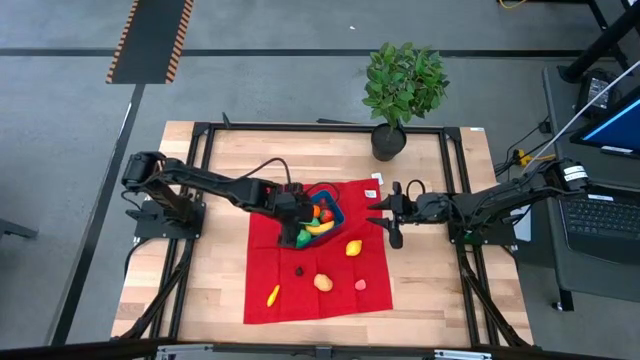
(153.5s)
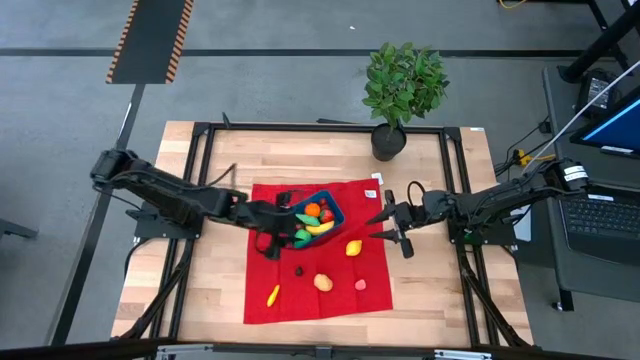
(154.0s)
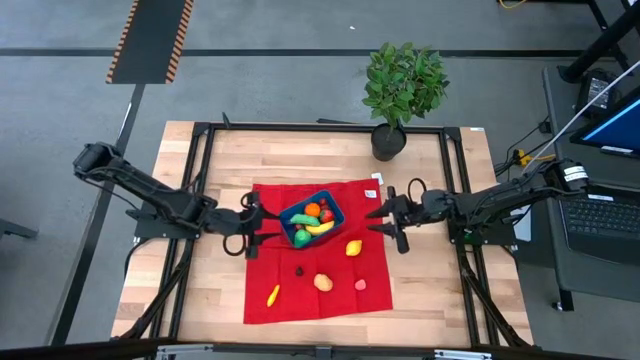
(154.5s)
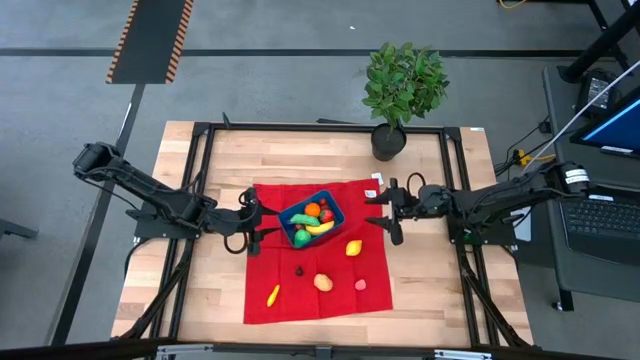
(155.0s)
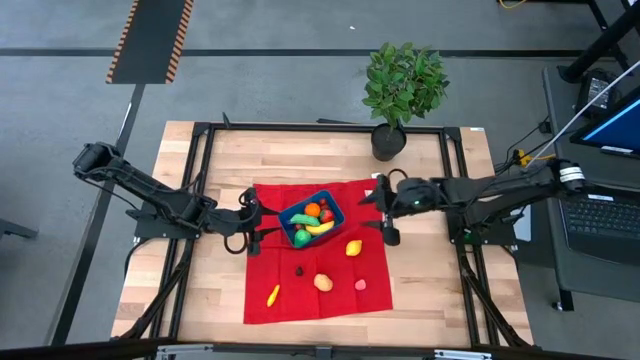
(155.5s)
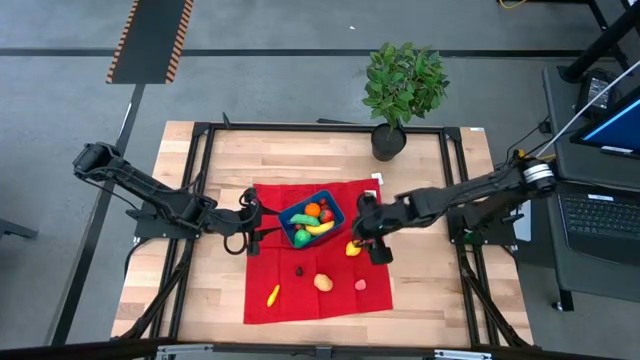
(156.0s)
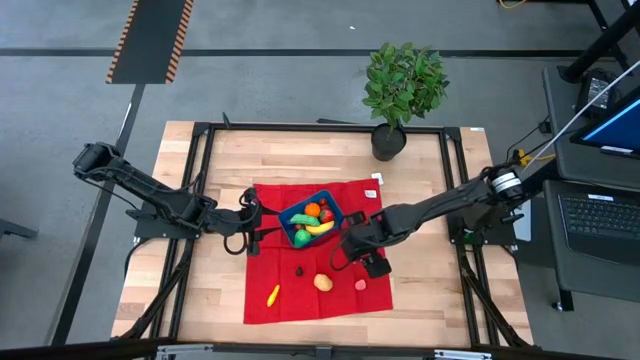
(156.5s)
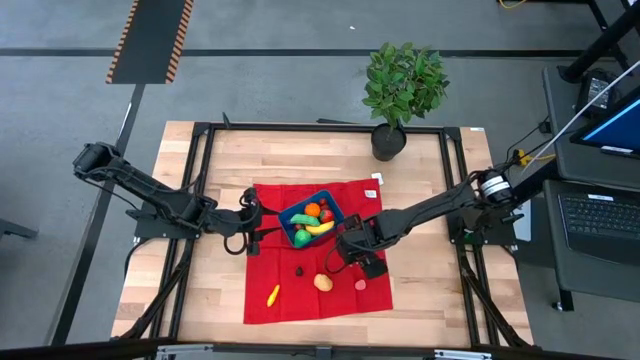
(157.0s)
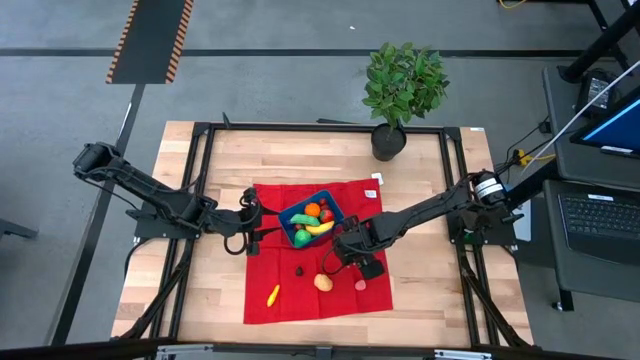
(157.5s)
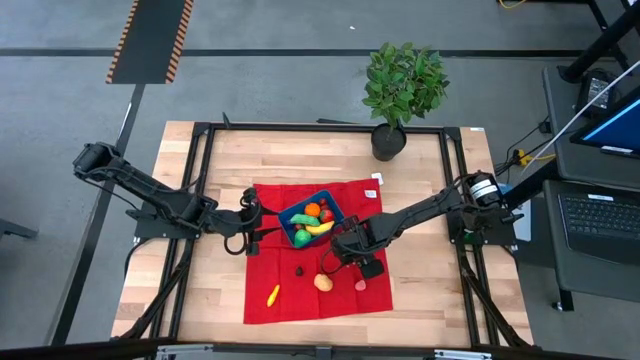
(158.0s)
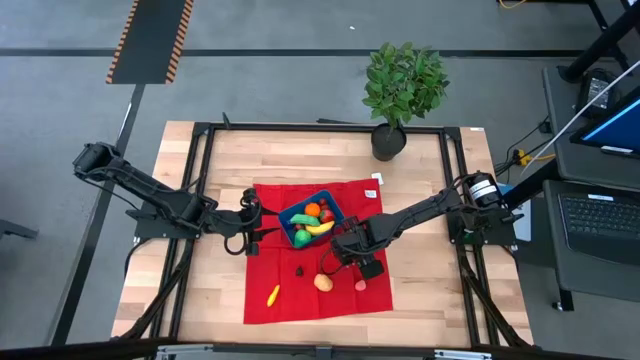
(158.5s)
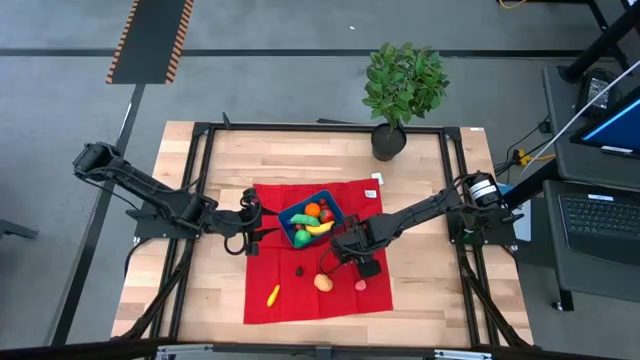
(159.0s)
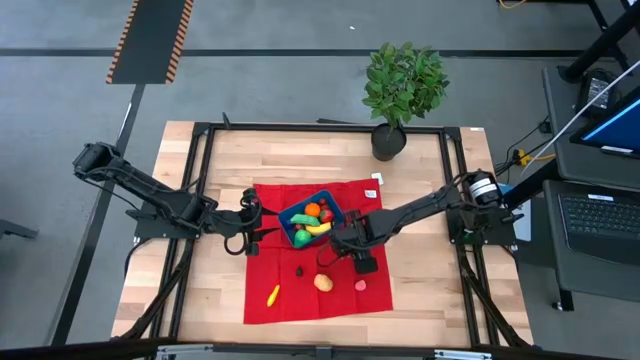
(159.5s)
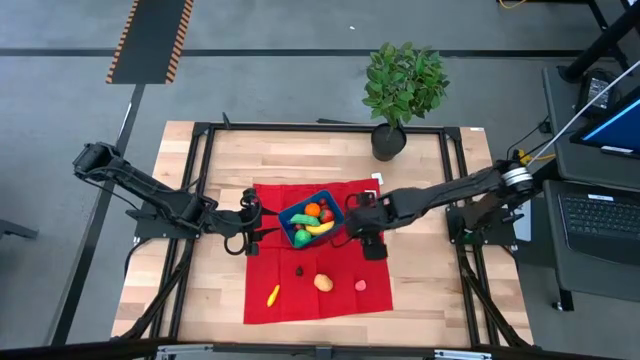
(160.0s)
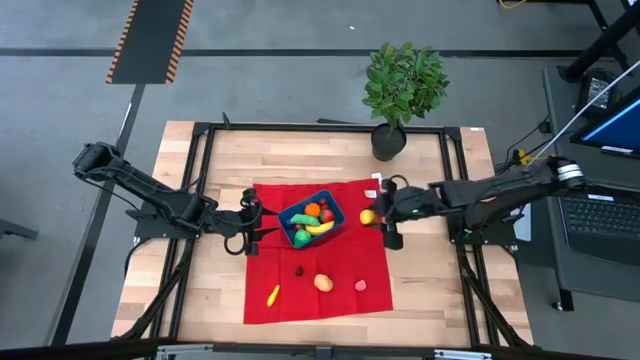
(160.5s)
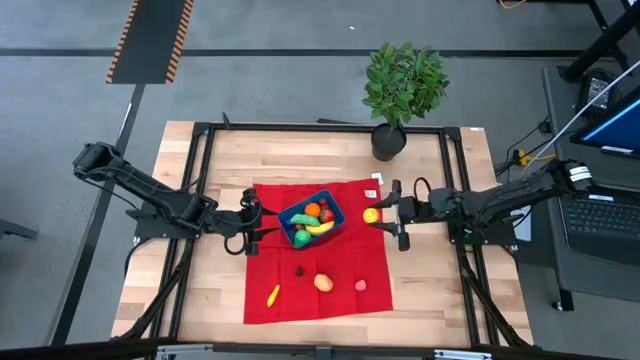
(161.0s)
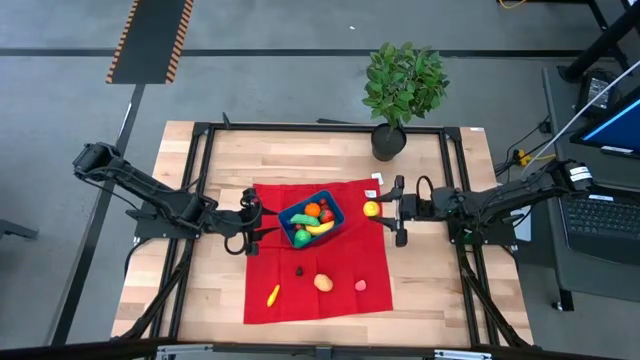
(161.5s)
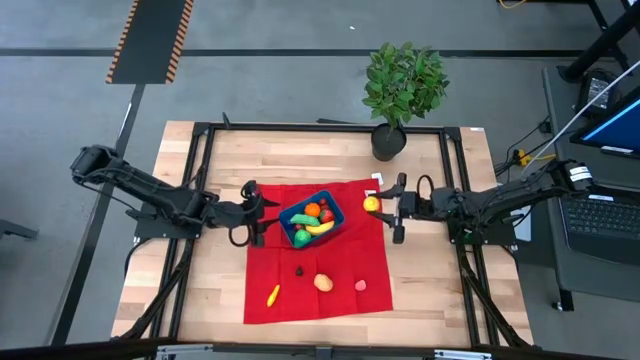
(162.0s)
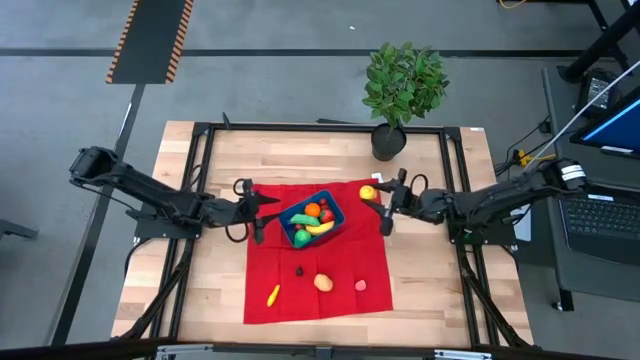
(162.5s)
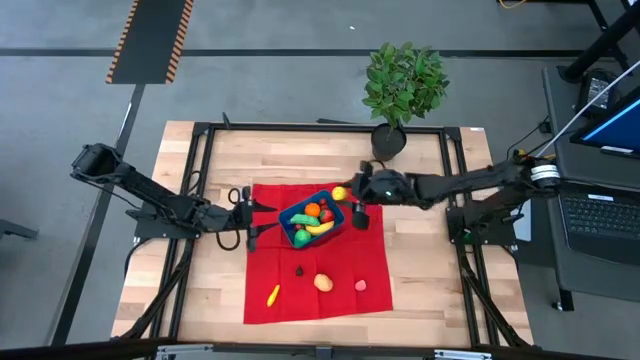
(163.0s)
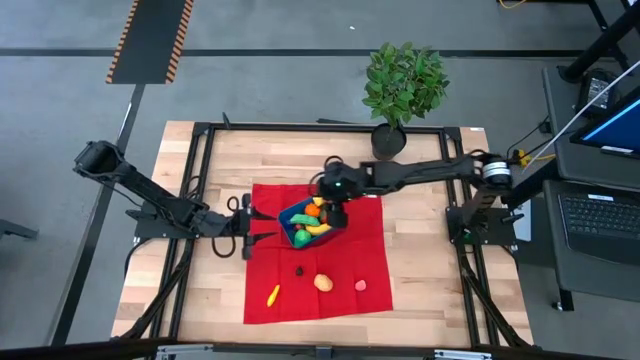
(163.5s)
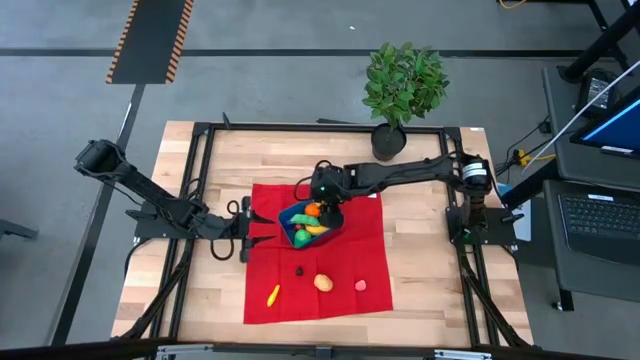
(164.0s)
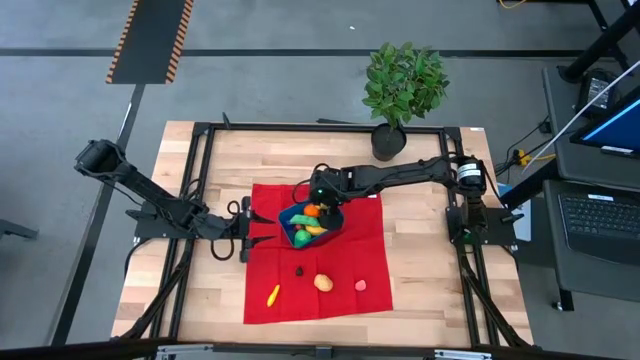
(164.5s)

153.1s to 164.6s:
Task: Pick and placing Produce into tupperware
Put the lemon into the blue bin

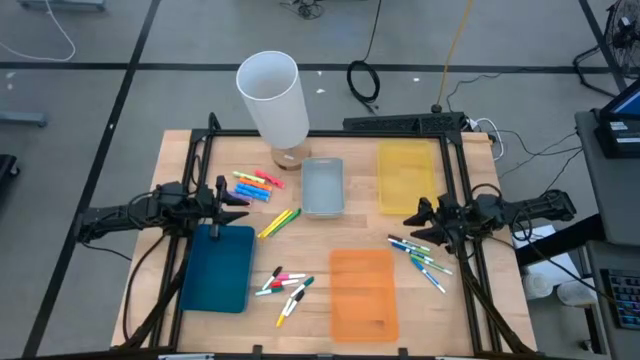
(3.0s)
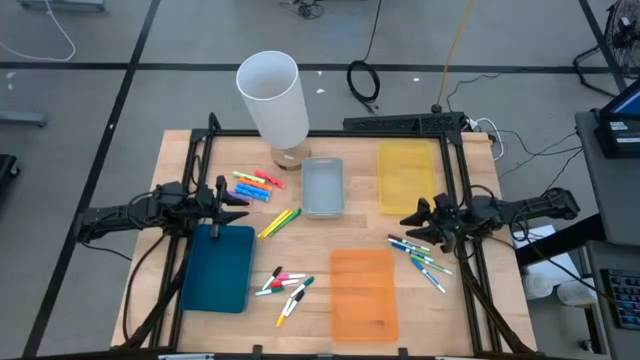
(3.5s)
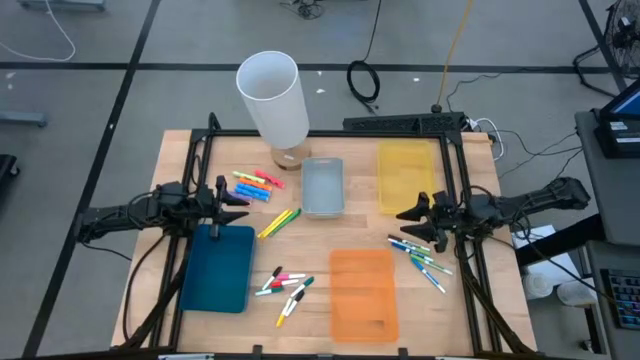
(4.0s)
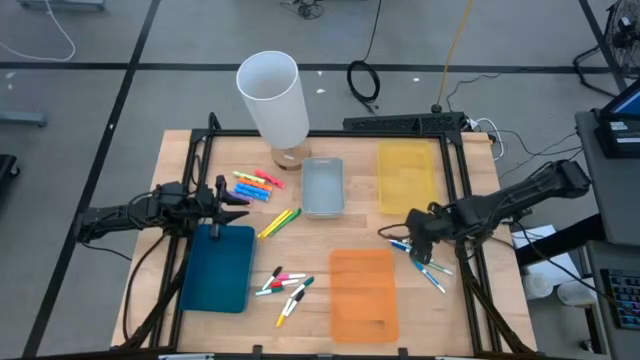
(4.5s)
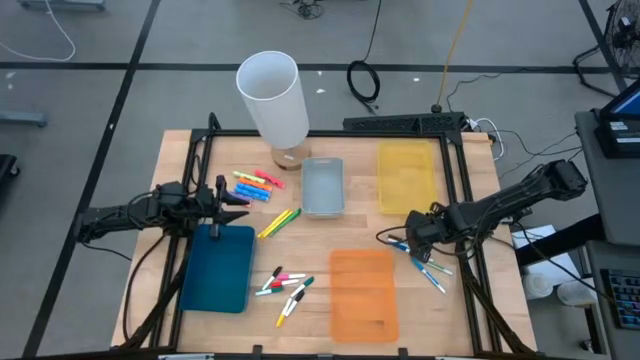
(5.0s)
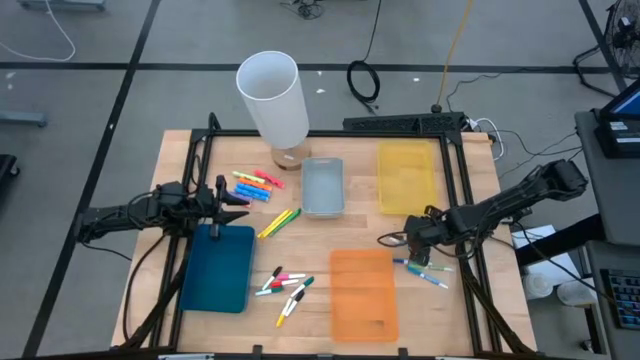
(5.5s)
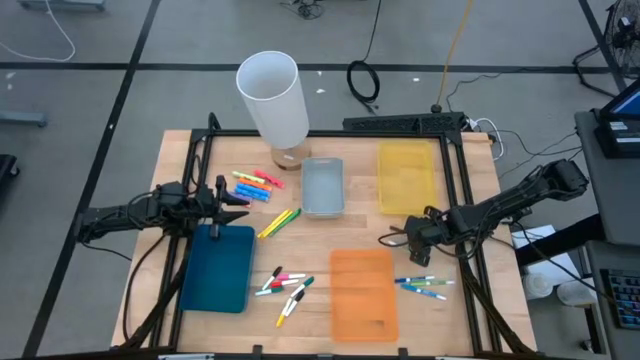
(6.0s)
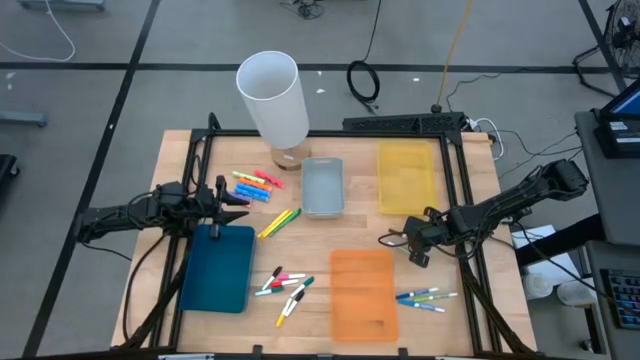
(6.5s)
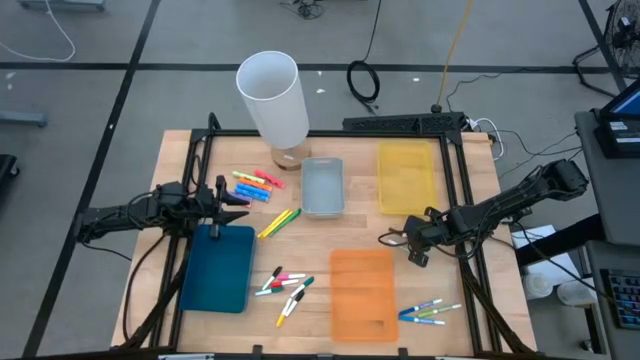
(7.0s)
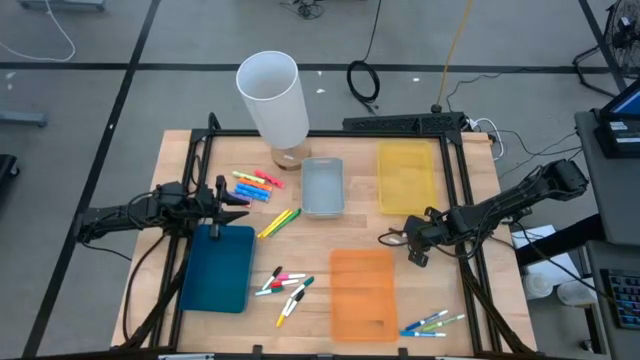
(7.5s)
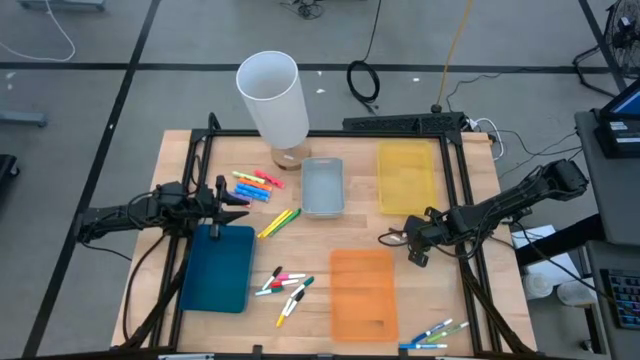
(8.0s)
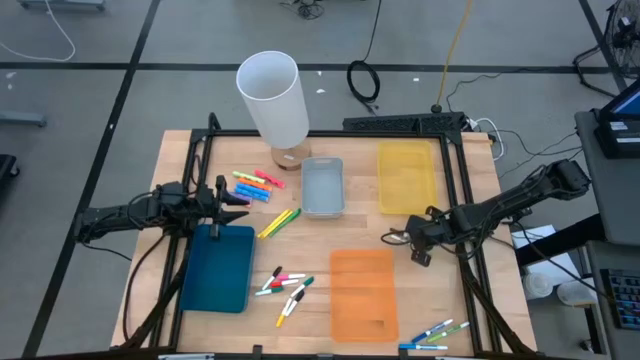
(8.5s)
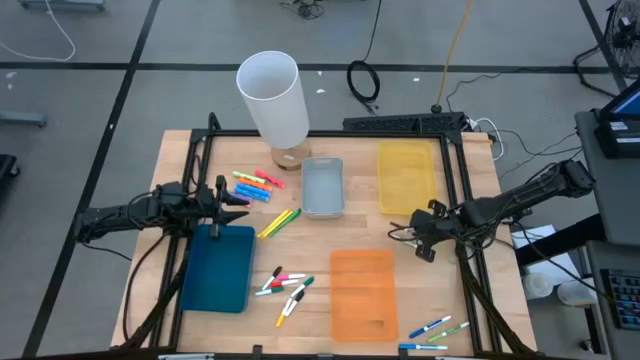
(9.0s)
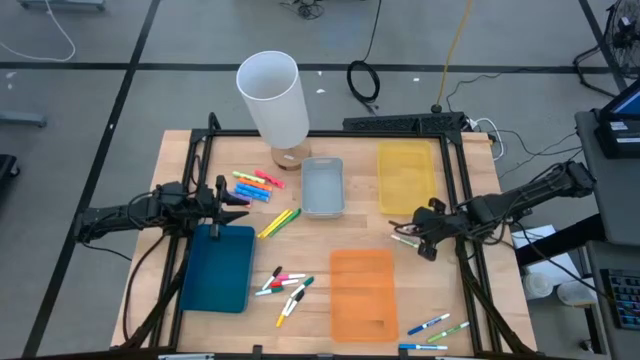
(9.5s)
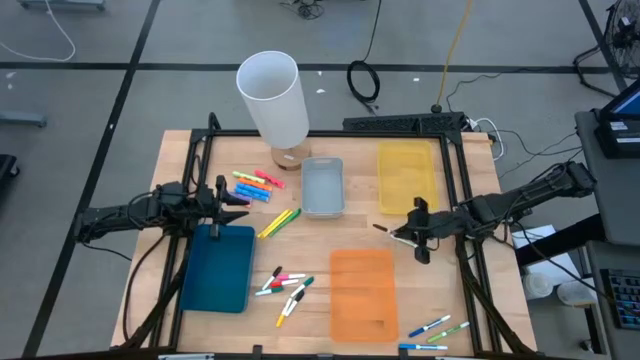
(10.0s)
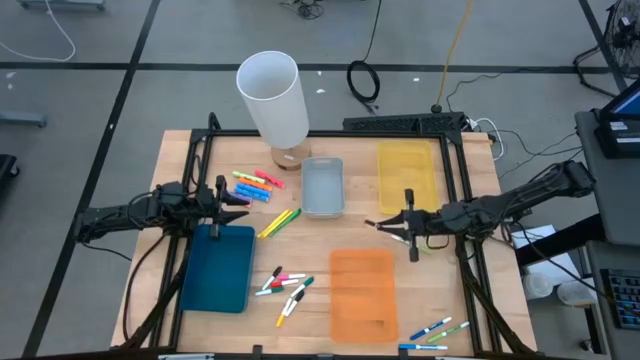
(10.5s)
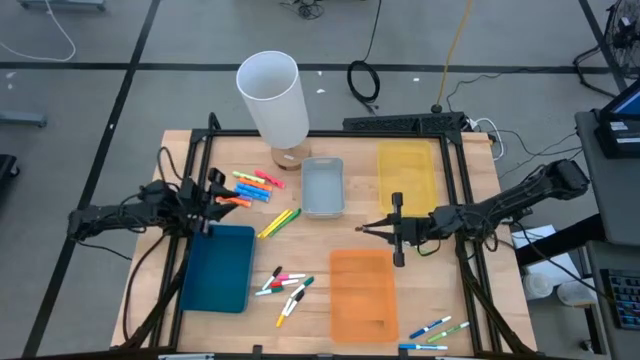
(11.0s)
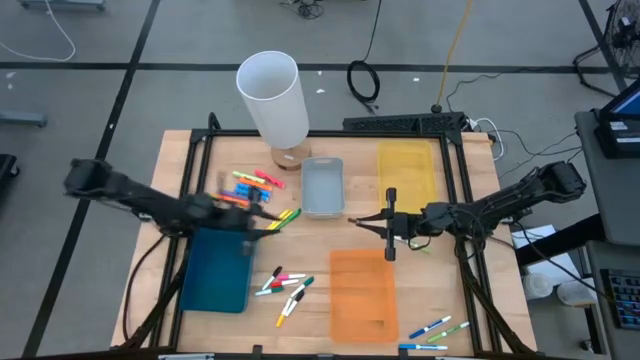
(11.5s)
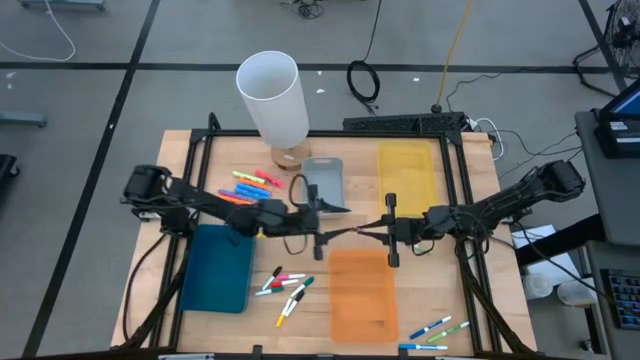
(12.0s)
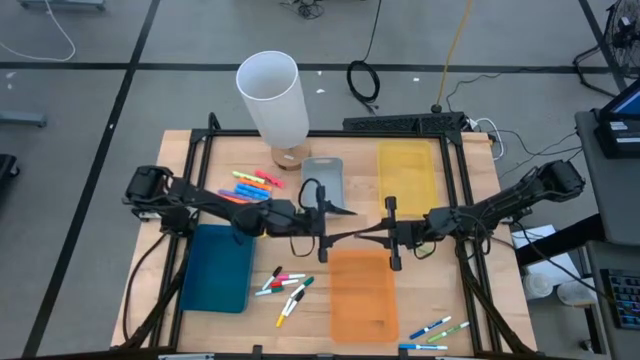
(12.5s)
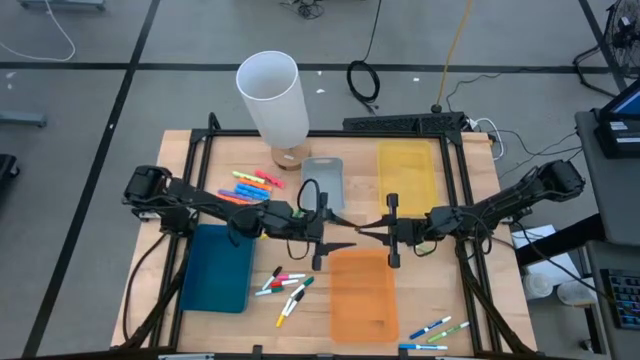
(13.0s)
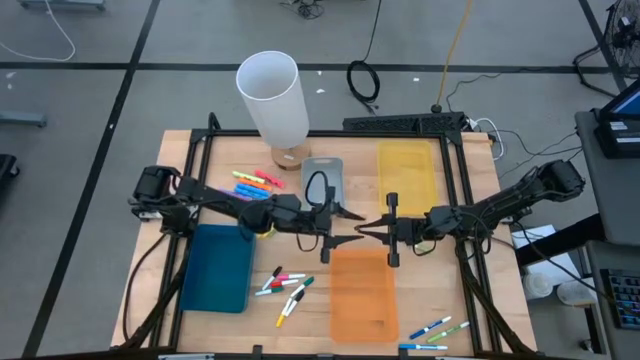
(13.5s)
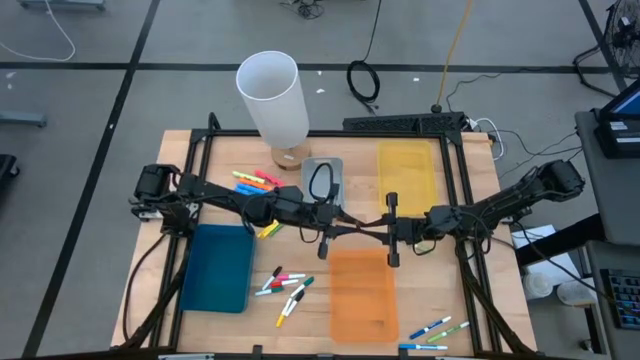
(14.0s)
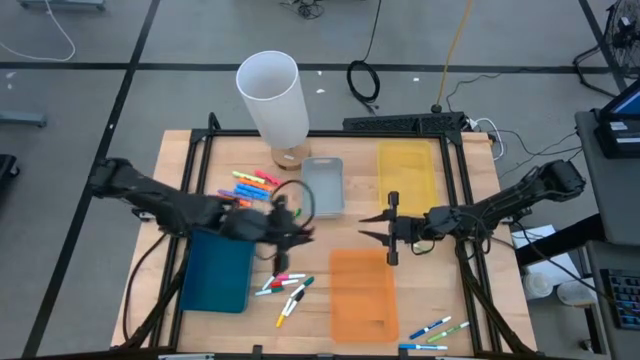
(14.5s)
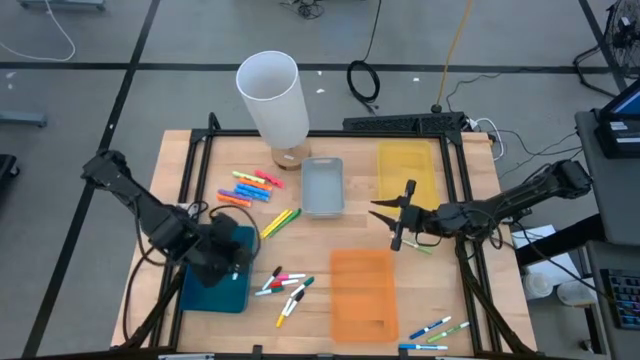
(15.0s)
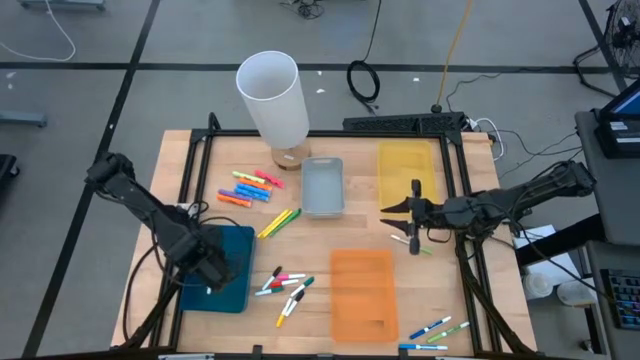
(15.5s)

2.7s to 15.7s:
Task: Pick & Place Markers
Put the brown marker pen into the blue bin
